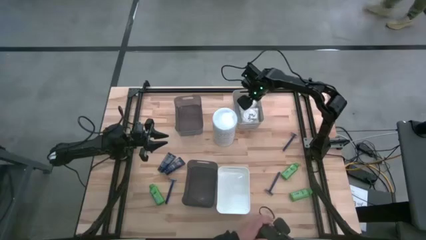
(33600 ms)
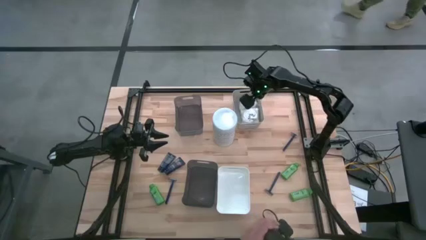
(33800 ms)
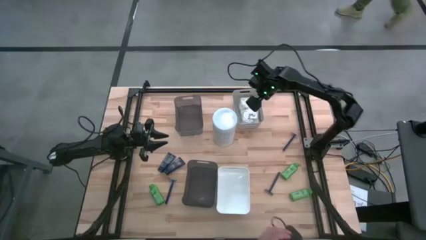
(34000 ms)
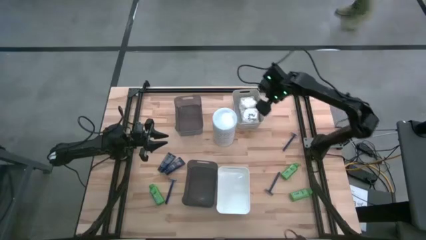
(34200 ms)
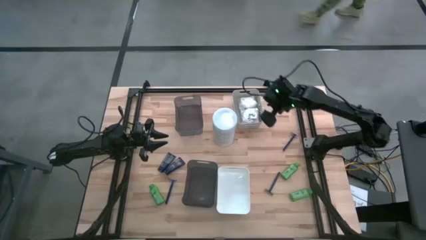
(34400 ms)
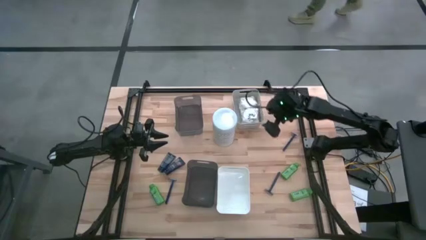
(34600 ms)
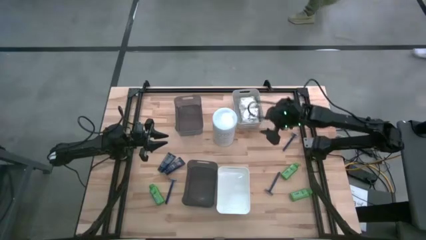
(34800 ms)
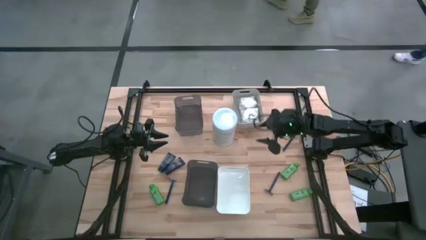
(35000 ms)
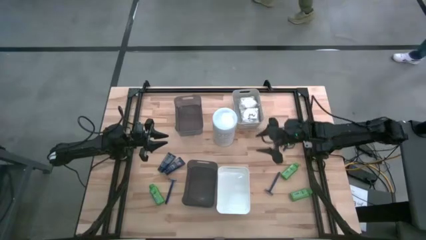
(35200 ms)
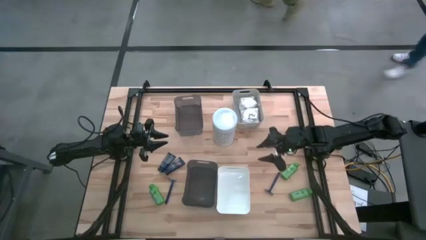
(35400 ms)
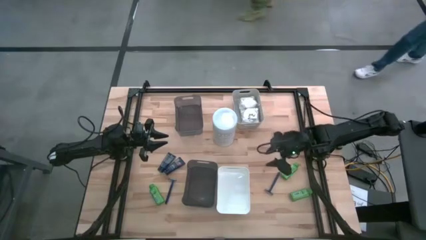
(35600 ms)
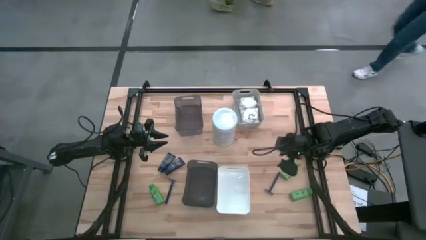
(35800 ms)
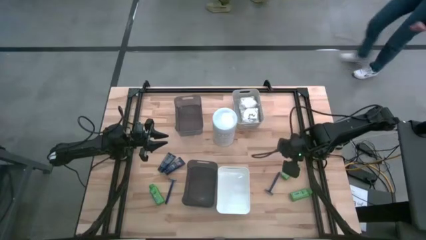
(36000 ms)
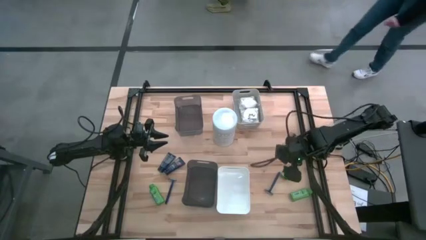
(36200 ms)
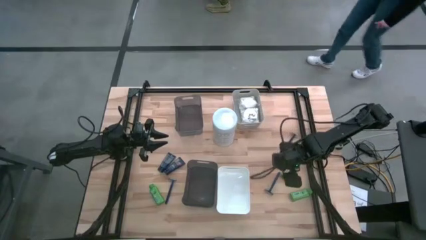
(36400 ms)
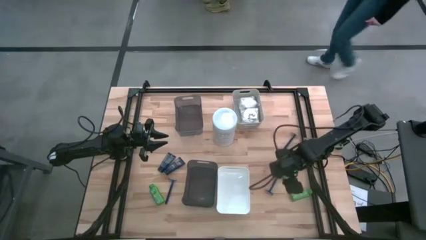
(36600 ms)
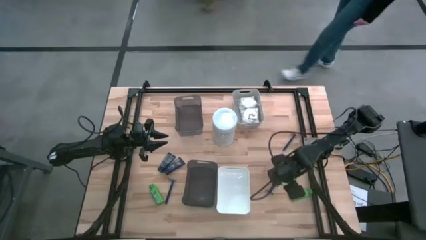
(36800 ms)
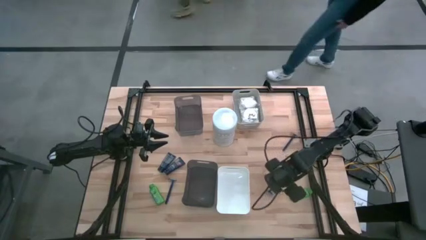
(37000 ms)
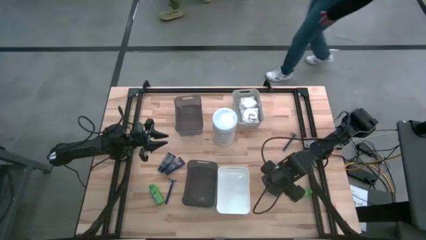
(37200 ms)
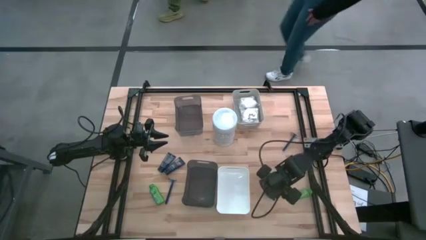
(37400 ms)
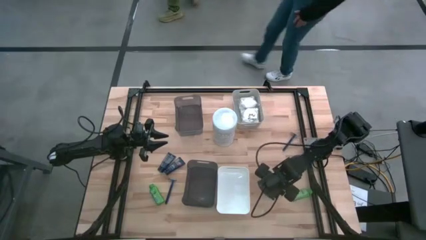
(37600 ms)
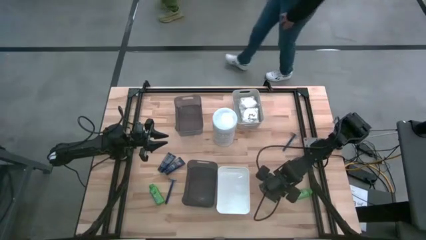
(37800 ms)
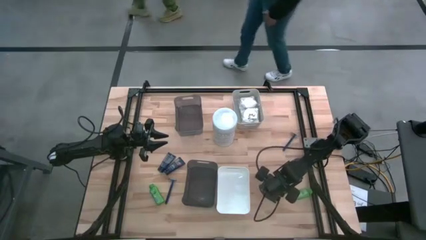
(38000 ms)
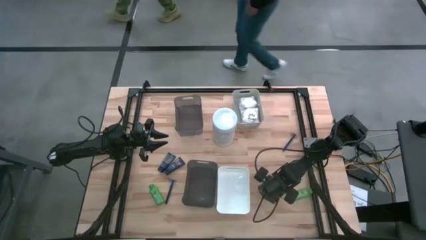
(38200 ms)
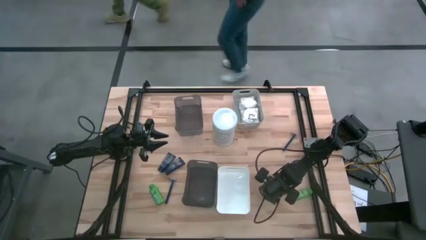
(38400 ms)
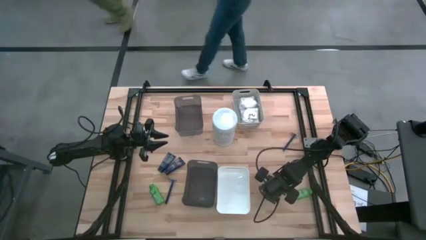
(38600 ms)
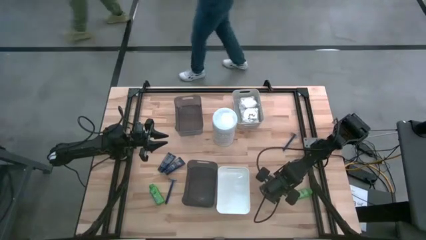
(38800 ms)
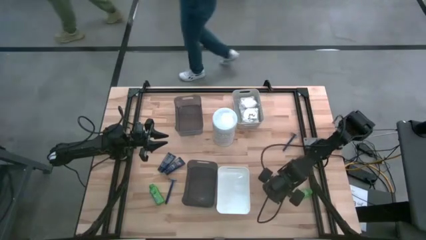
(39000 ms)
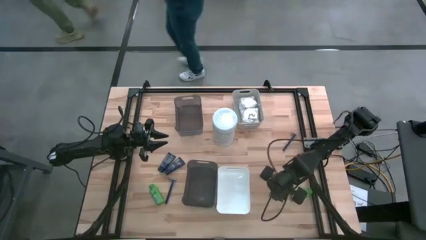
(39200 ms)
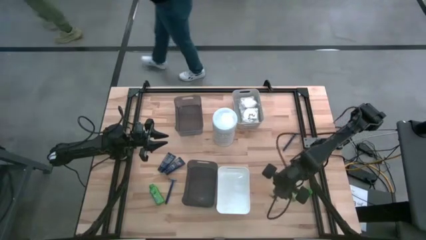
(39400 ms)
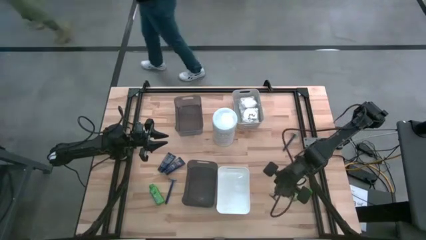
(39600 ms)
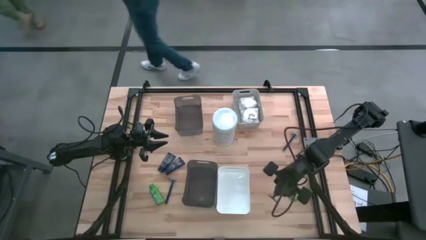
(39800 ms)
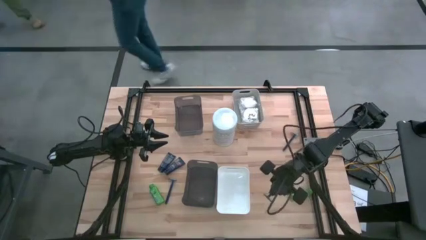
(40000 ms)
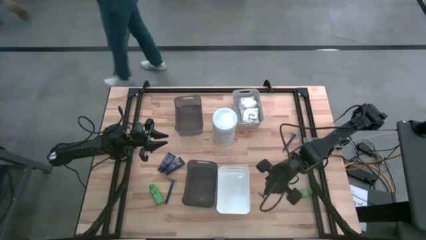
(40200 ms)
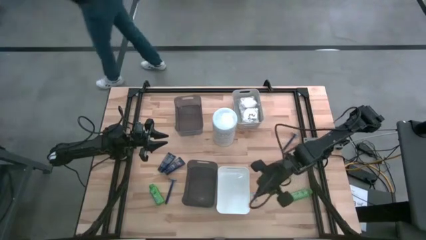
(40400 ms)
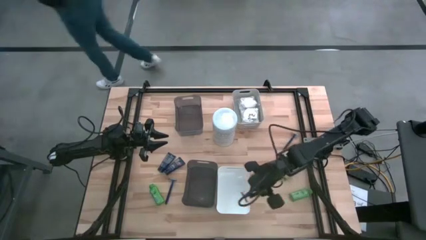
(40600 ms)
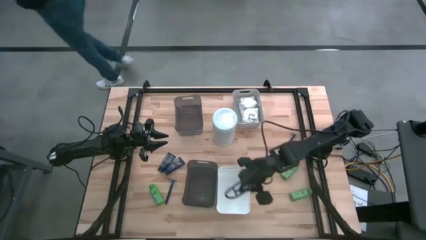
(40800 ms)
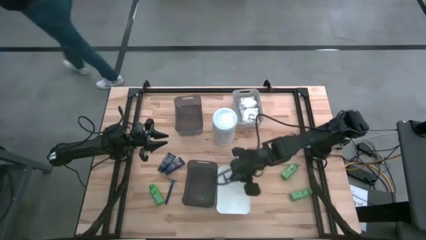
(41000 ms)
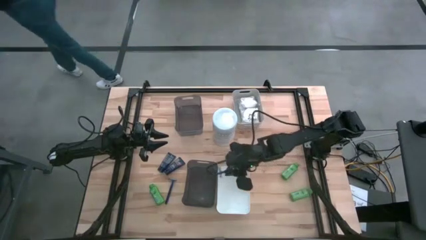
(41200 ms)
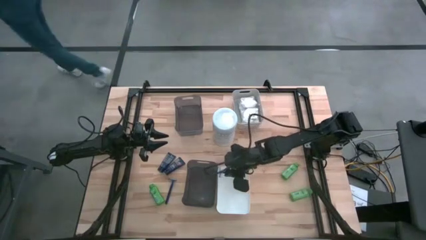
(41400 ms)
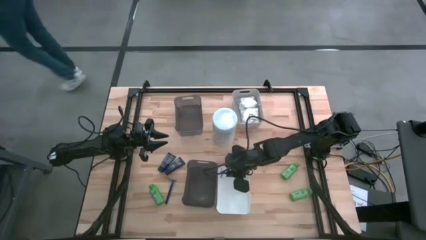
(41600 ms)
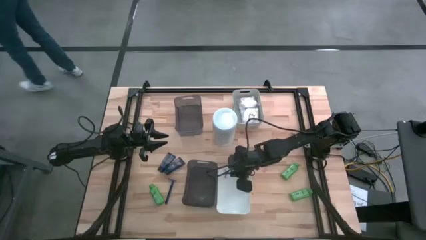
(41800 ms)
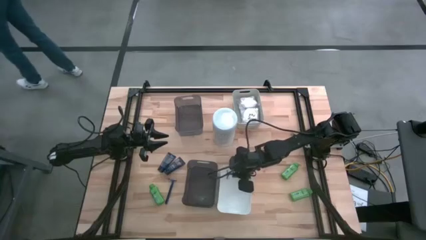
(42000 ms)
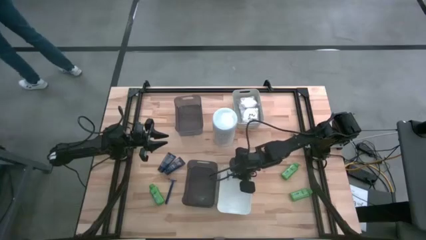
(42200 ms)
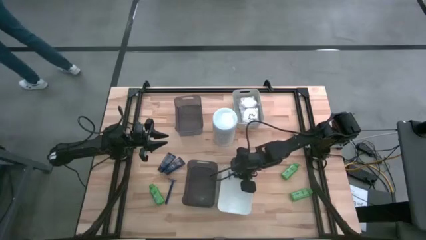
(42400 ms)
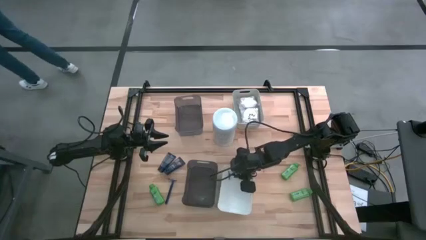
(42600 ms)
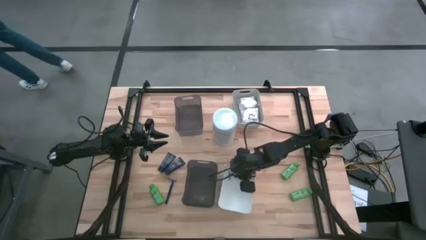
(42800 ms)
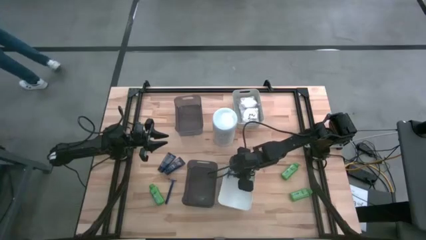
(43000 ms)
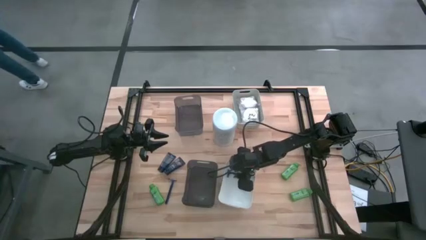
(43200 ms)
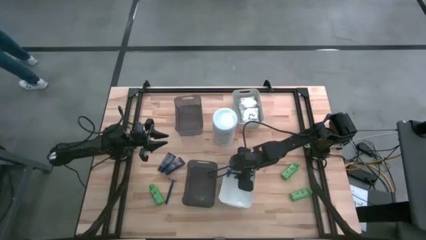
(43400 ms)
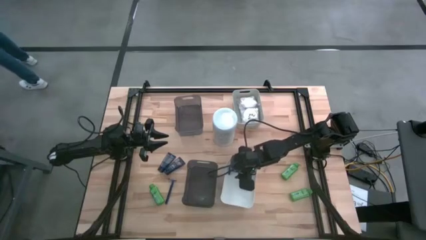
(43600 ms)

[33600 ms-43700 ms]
Task: Pick & Place Travel size toiletries
Put the blue razor into the white bin

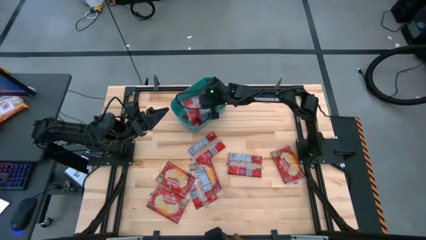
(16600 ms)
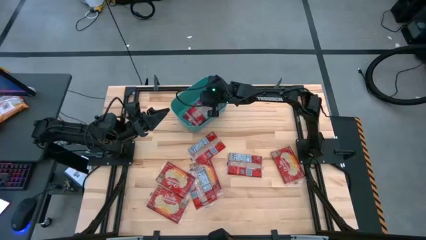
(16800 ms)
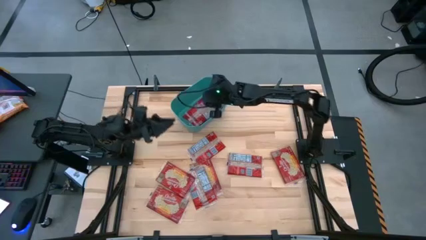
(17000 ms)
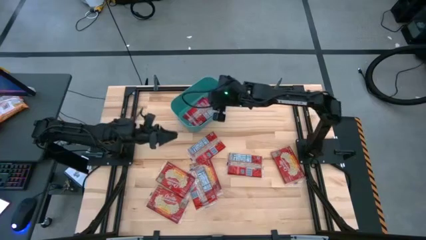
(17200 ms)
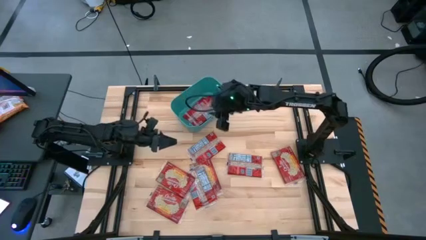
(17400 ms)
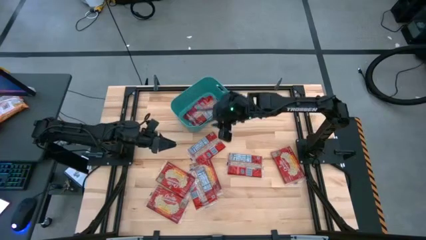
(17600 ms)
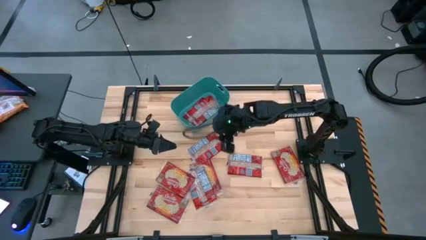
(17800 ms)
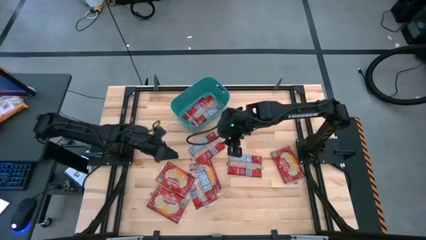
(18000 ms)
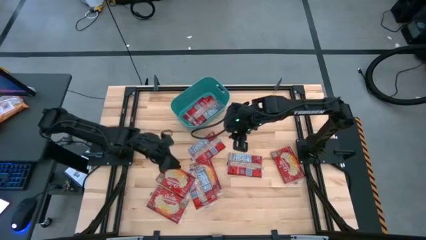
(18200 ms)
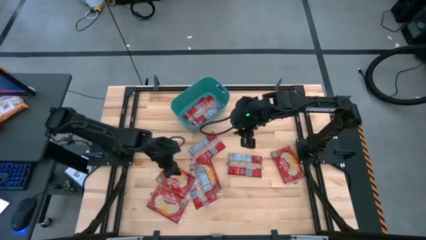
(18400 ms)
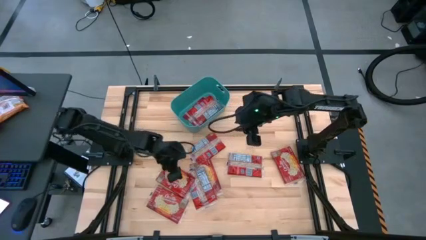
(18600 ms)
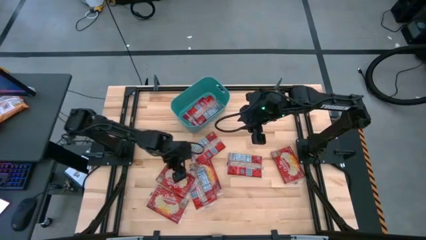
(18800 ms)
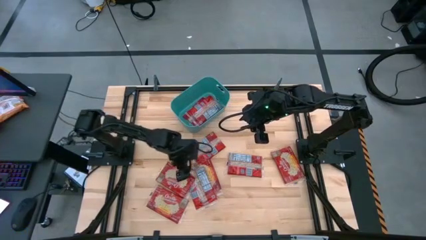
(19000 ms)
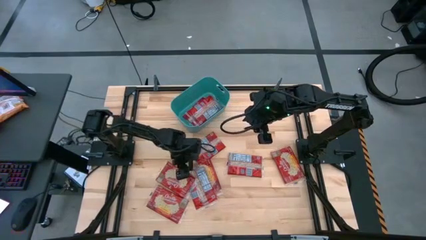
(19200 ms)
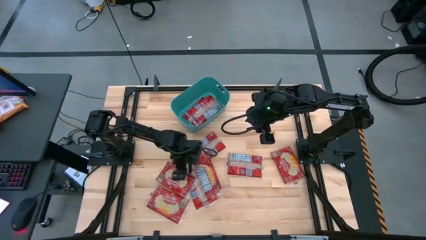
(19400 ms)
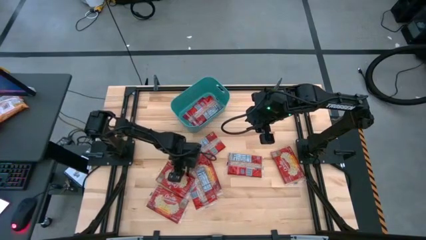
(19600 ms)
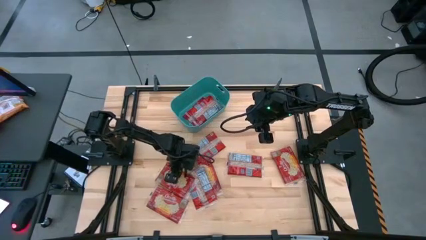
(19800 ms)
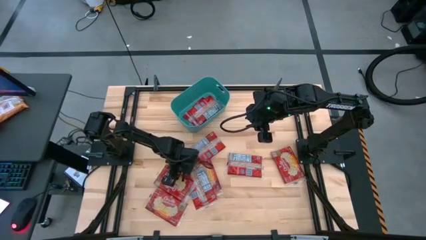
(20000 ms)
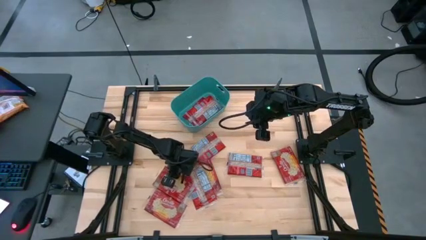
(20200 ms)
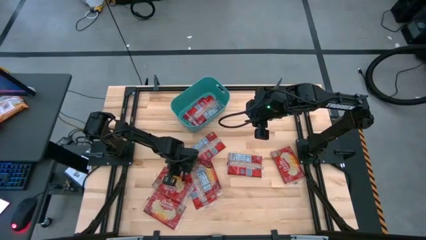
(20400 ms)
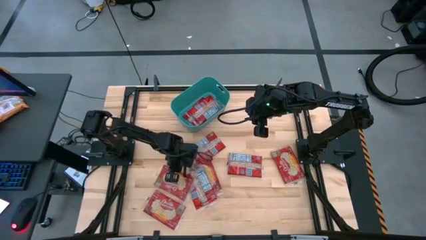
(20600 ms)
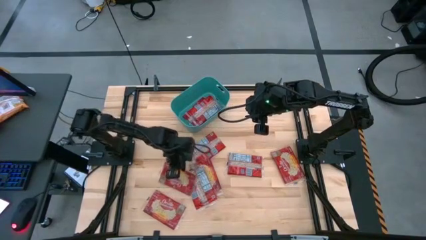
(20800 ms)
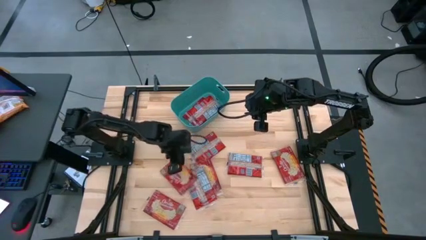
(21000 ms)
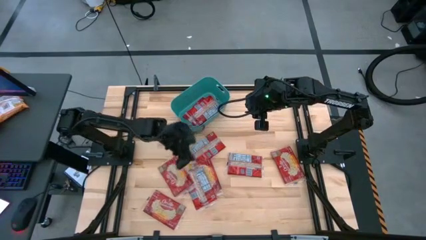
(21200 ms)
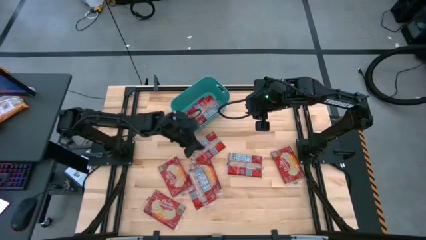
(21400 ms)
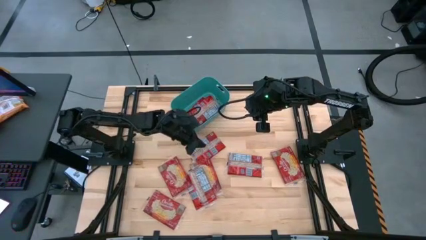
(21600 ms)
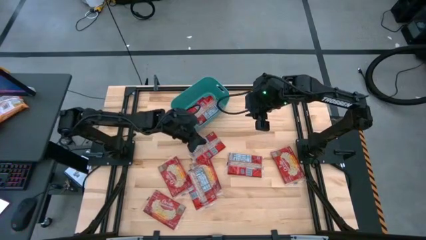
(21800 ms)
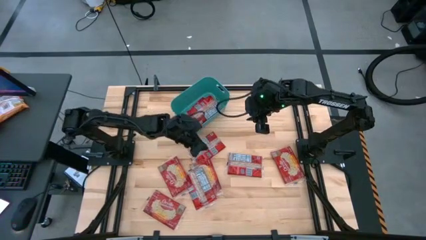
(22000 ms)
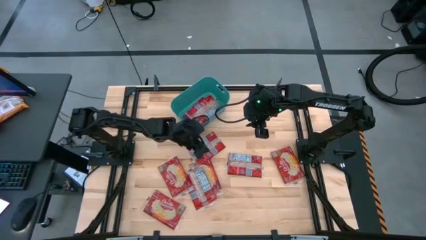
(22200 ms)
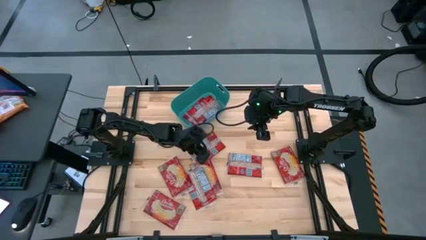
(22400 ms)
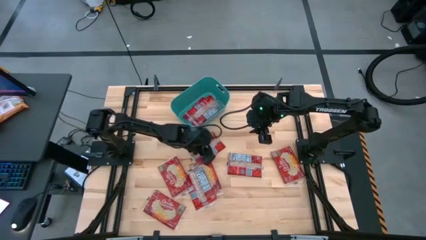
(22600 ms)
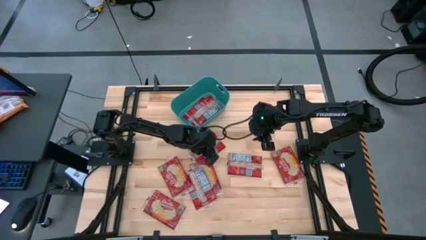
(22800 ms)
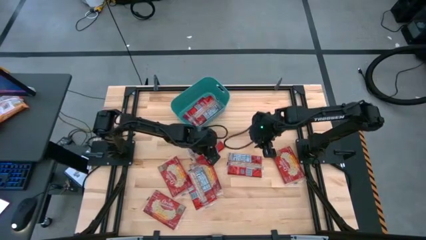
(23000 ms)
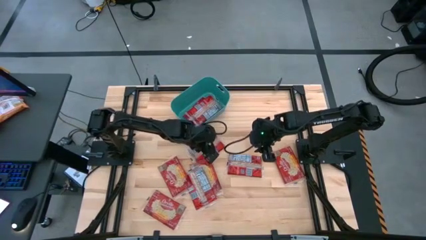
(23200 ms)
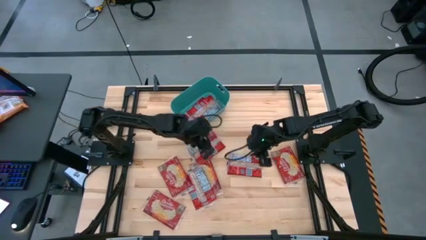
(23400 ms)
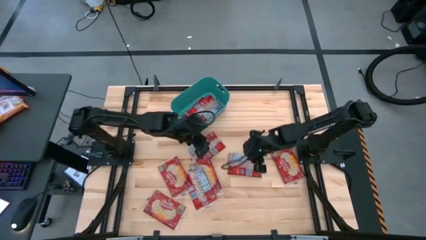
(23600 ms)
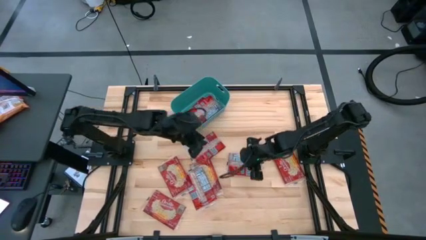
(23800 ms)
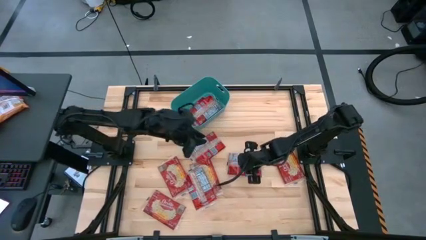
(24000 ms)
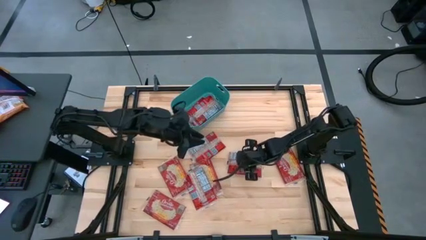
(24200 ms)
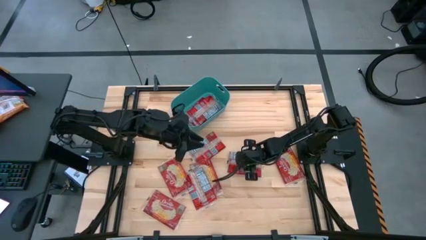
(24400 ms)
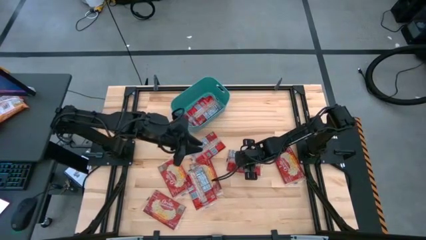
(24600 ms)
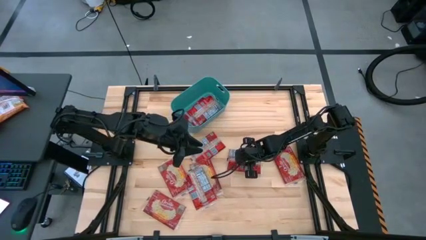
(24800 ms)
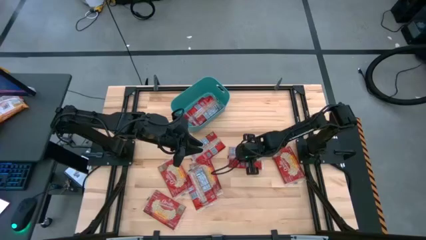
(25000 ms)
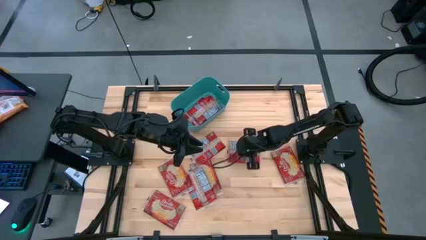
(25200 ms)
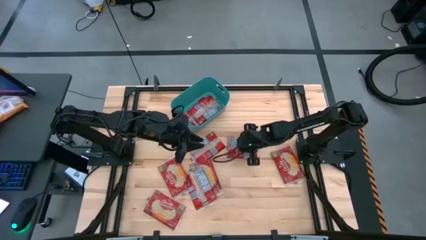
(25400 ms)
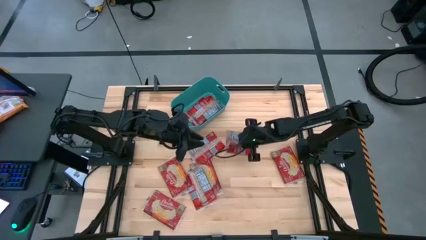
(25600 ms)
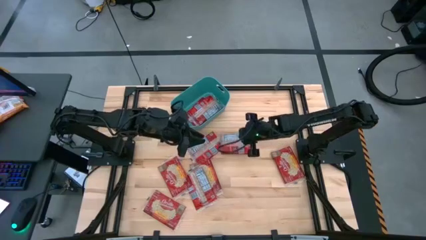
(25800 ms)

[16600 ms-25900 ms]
Task: Sort popcorn bags into baskets
Put the red popcorn bag into the blue bin
